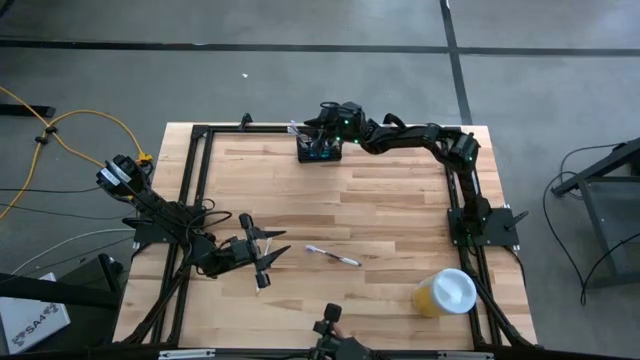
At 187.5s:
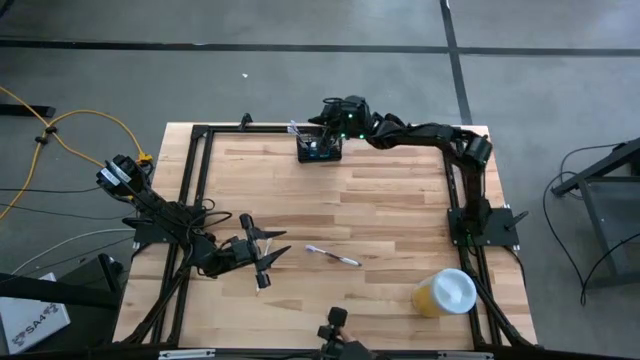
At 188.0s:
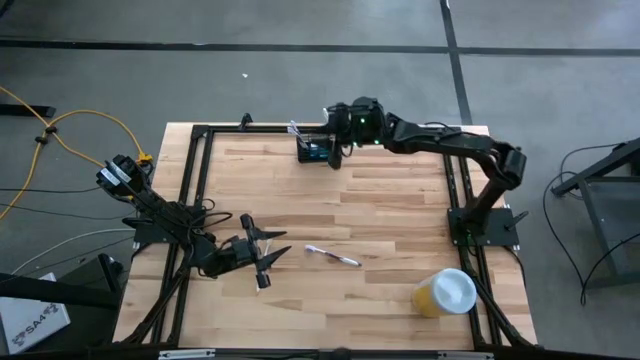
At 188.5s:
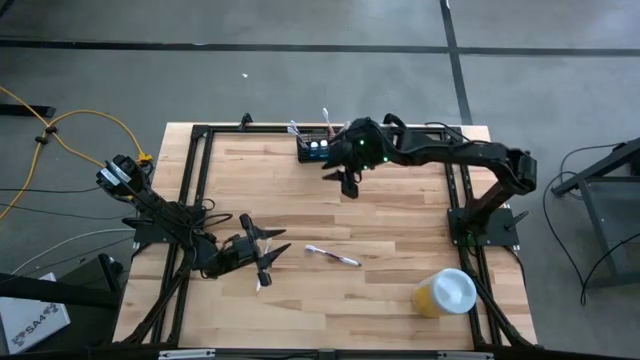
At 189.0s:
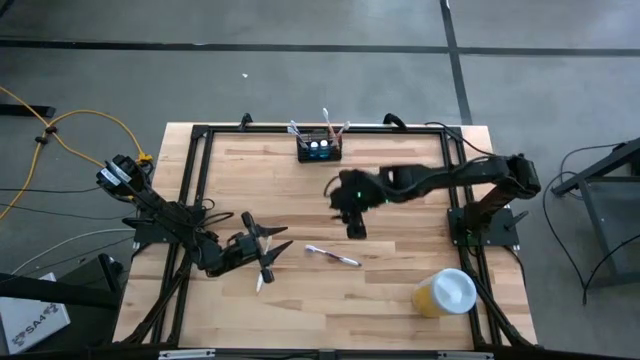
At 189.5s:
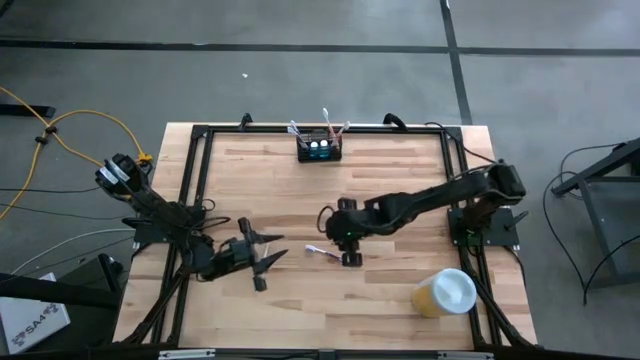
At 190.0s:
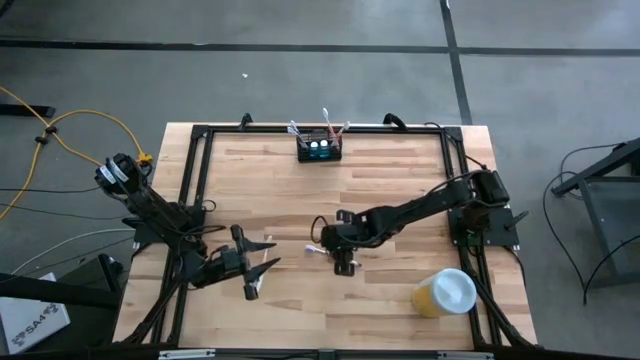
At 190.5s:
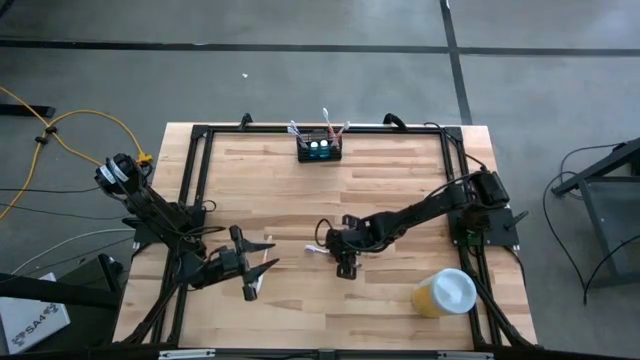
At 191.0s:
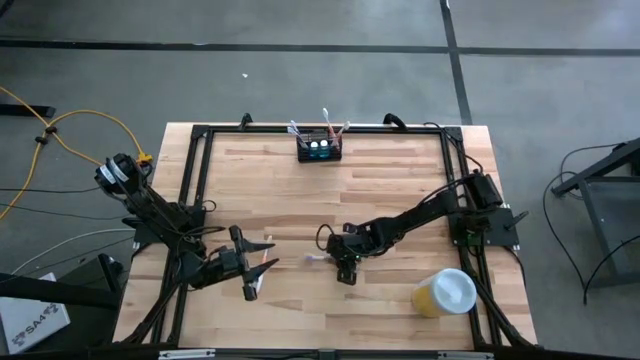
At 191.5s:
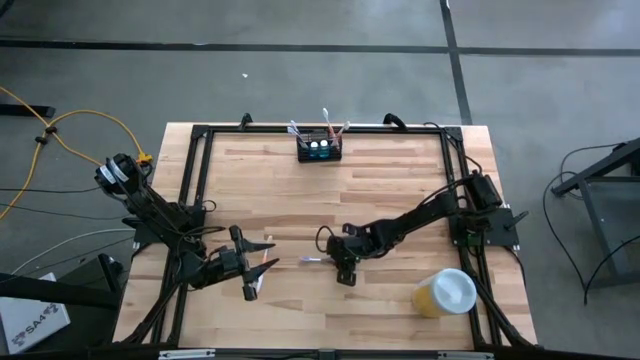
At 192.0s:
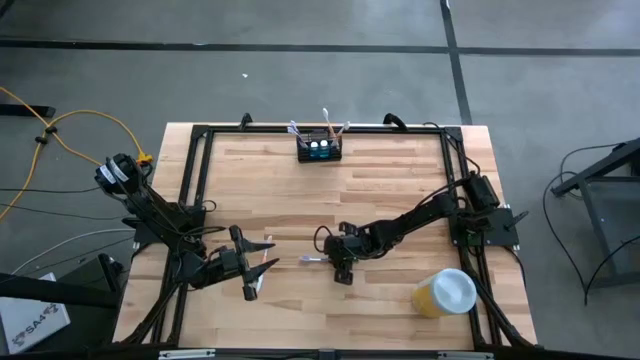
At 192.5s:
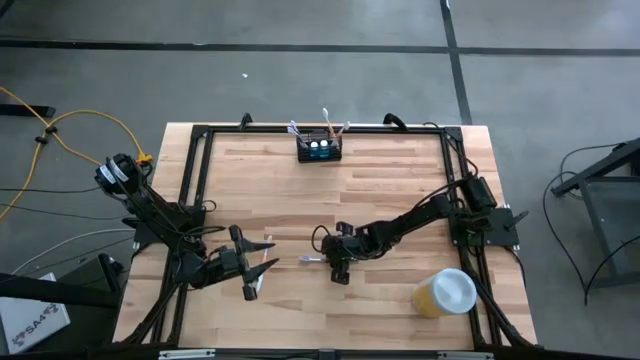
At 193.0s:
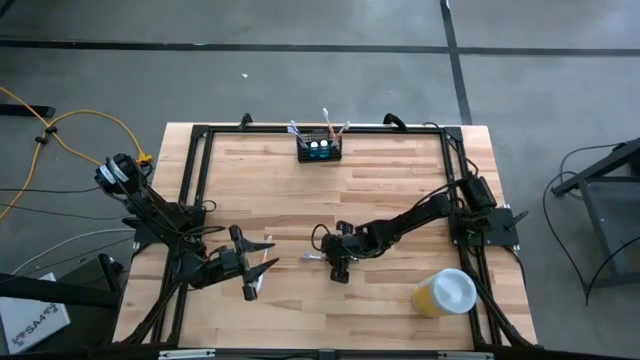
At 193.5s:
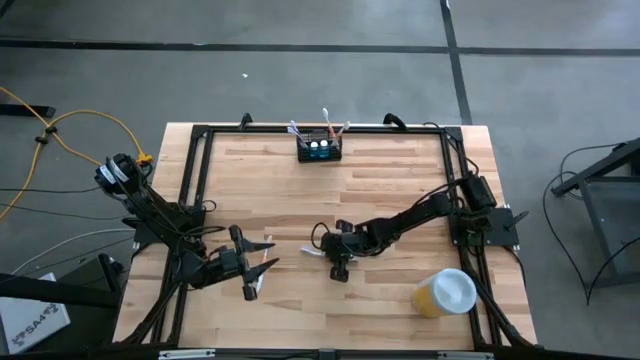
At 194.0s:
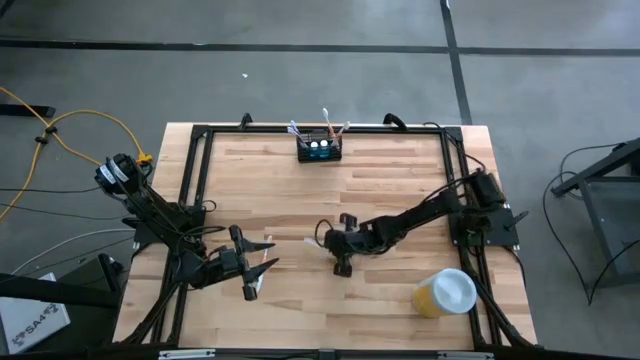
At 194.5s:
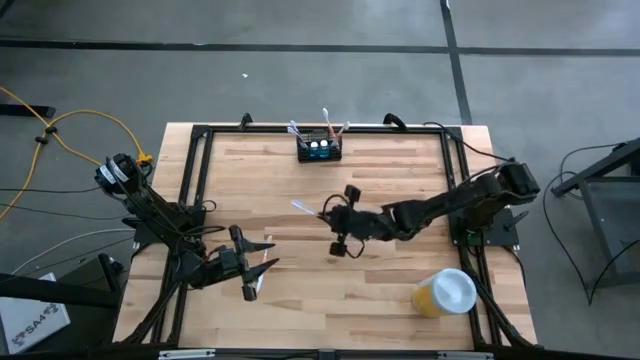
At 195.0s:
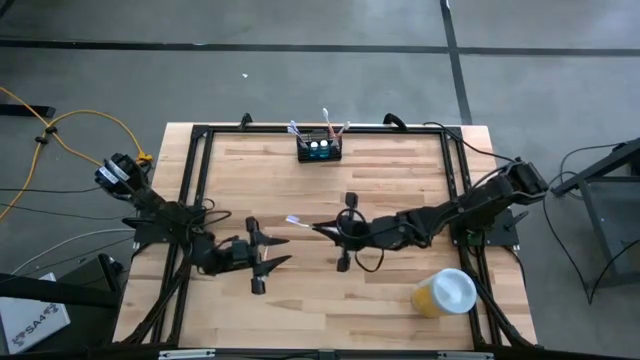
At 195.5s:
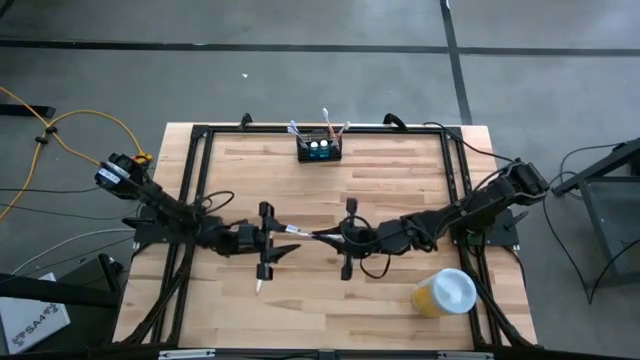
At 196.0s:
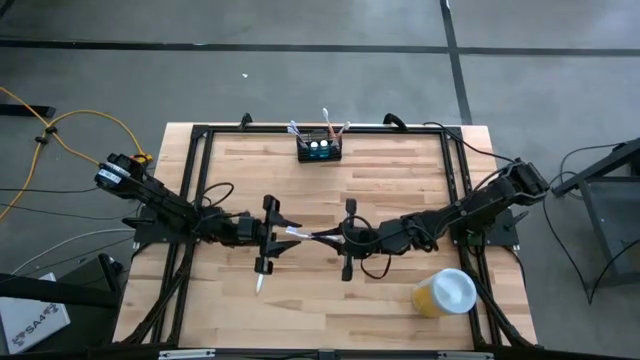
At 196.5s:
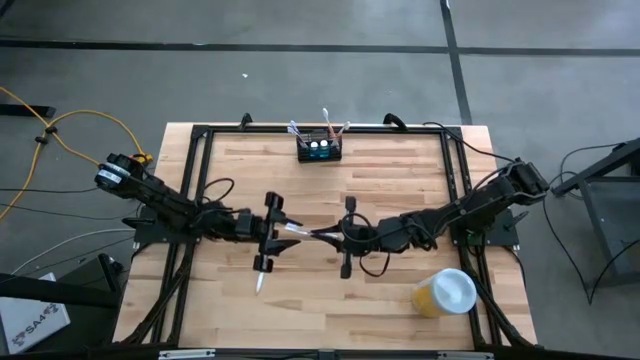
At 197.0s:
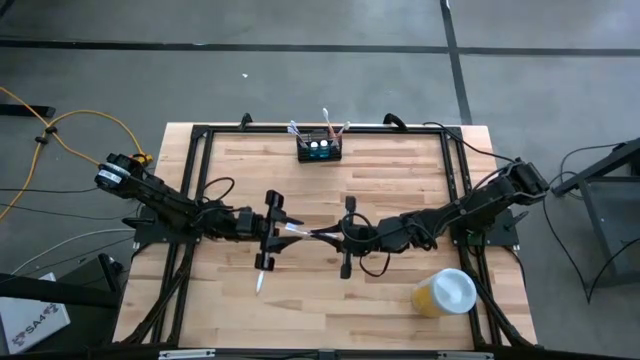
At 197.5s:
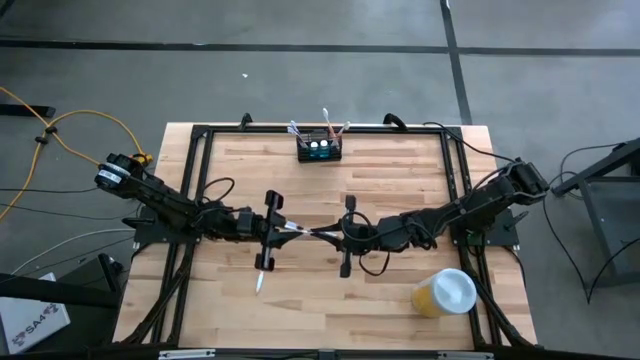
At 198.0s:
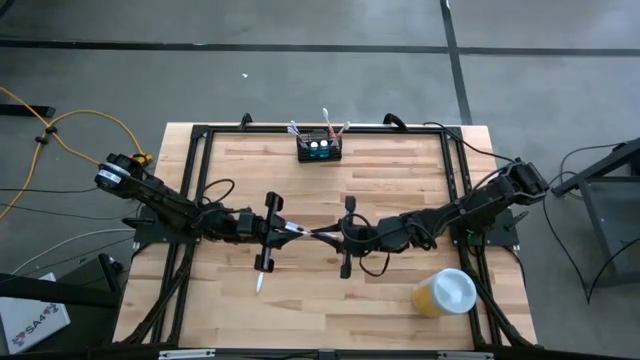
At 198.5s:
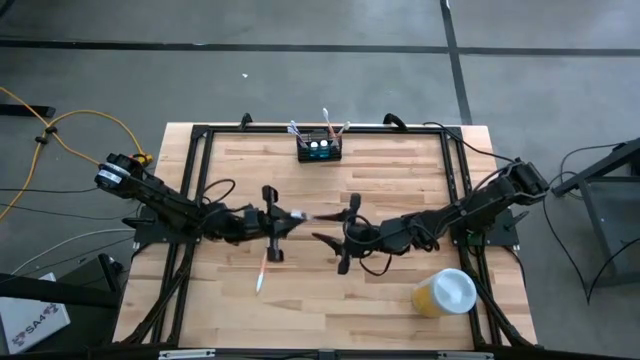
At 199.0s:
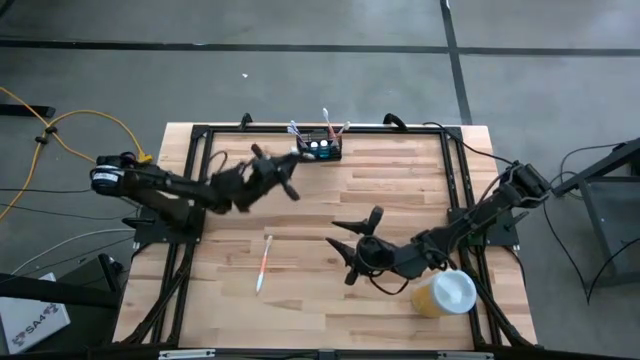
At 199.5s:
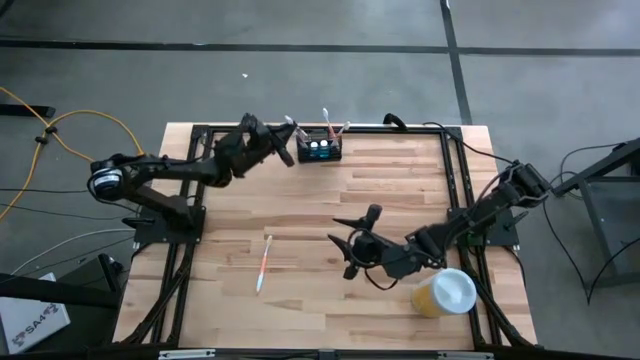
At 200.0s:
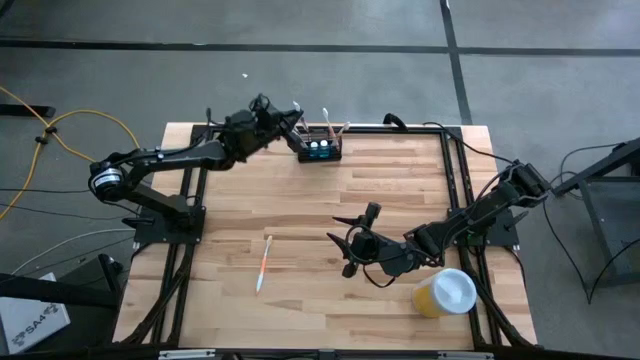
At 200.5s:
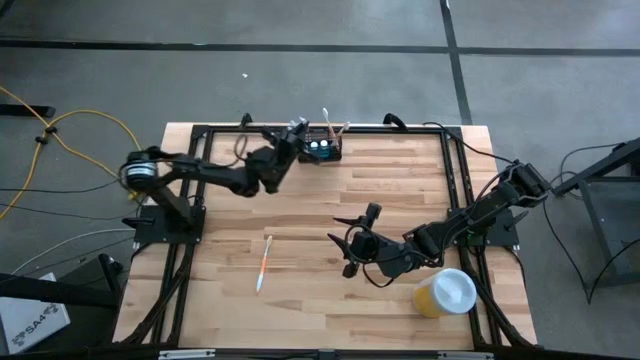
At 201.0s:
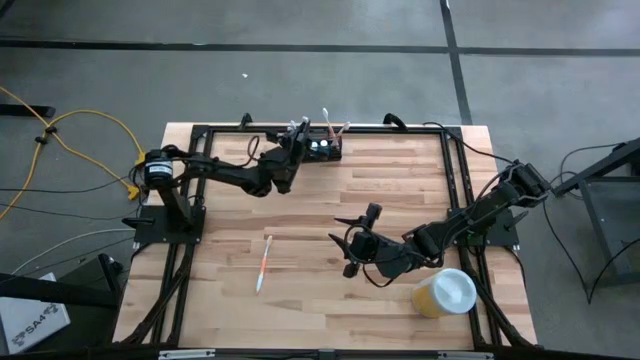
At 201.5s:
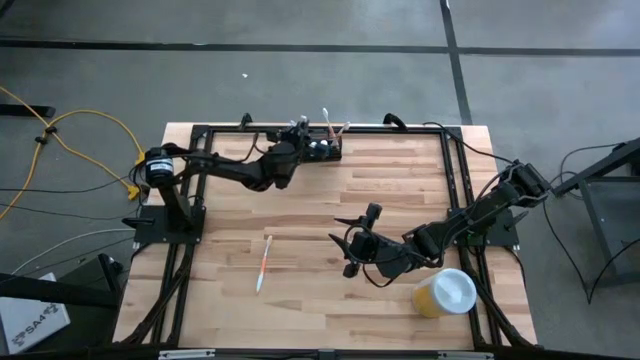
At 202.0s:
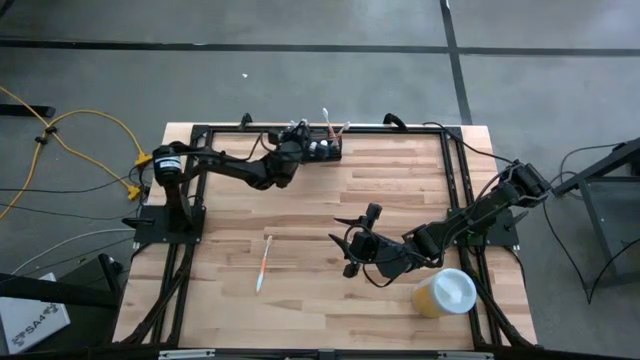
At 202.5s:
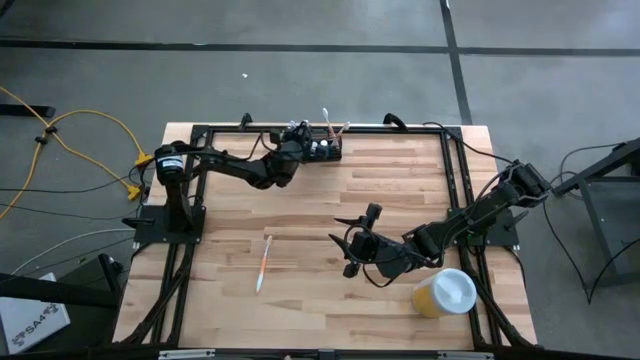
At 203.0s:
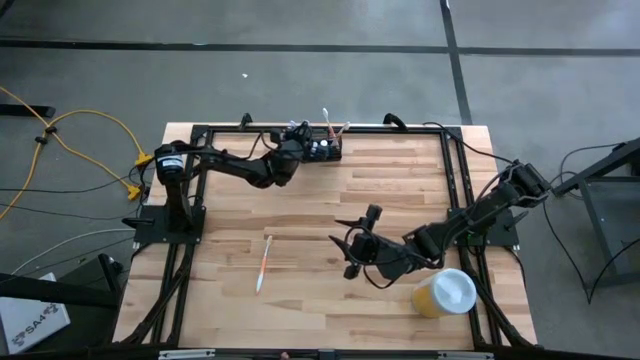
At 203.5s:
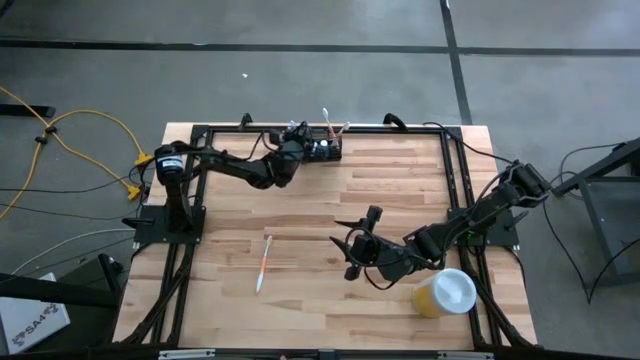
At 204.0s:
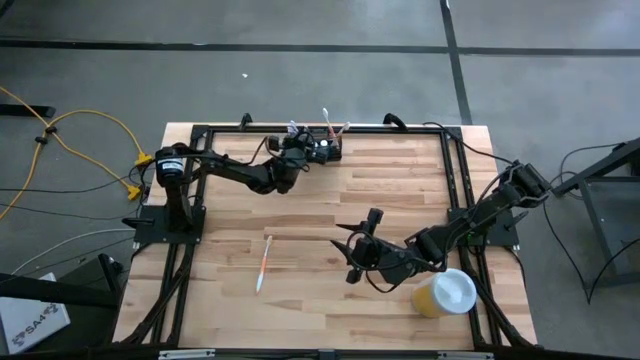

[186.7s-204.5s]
Task: Pick & Place toothbrushing station
Put the purple toothbrush into the wire organizer

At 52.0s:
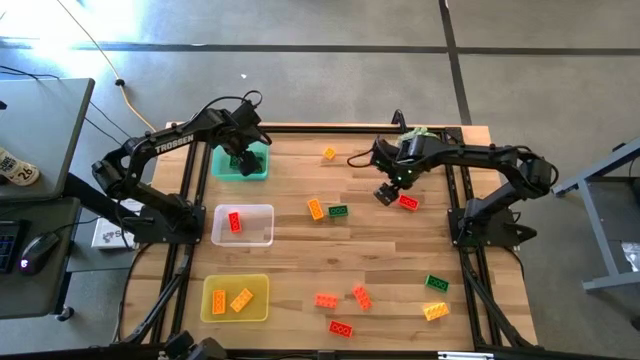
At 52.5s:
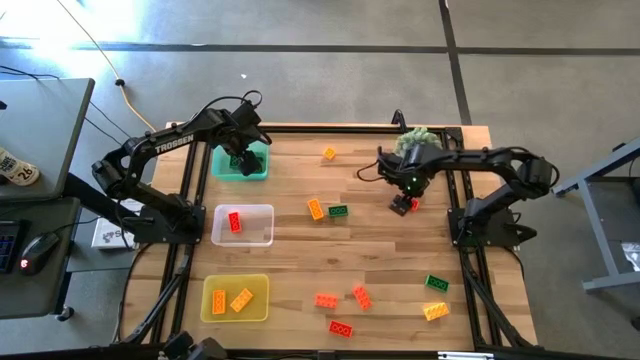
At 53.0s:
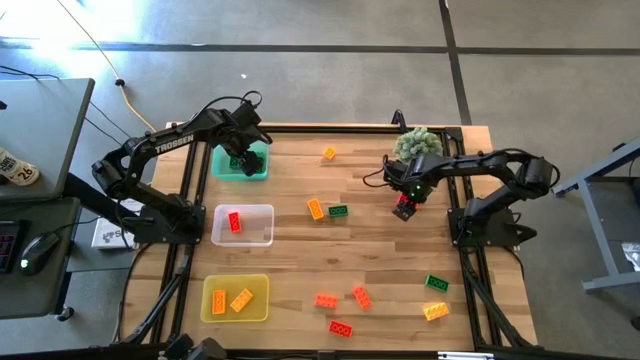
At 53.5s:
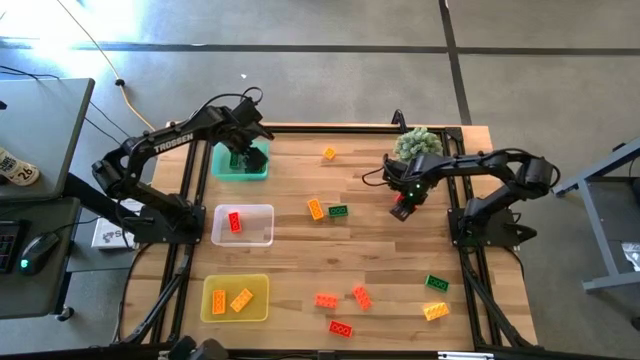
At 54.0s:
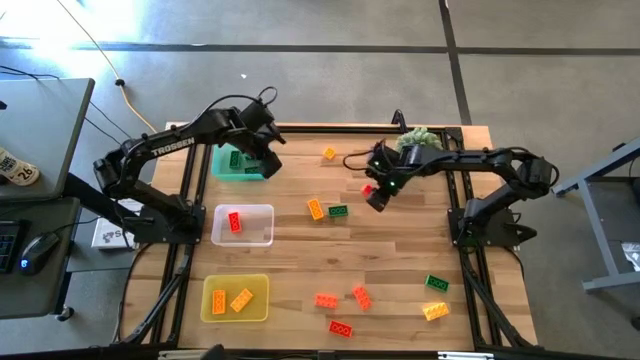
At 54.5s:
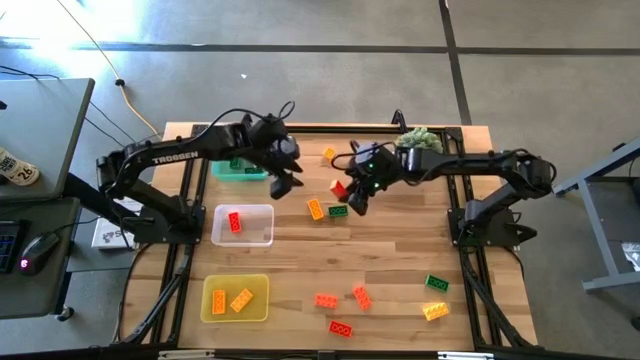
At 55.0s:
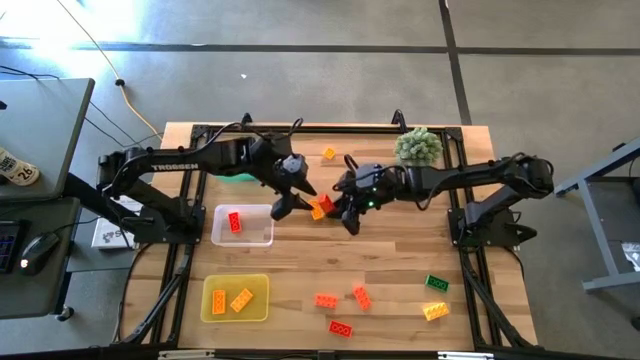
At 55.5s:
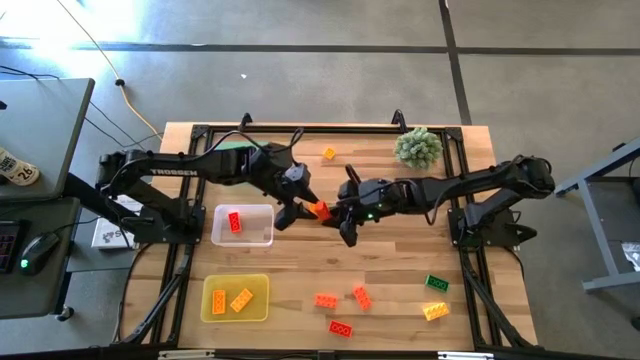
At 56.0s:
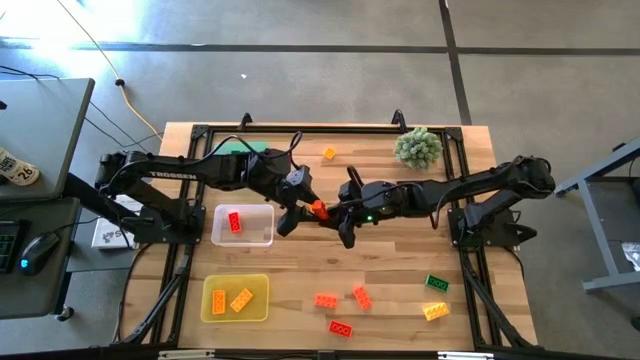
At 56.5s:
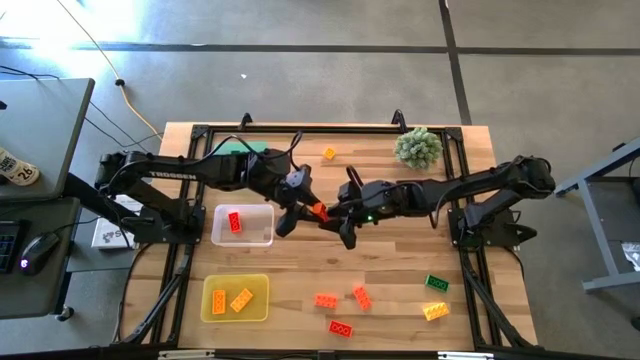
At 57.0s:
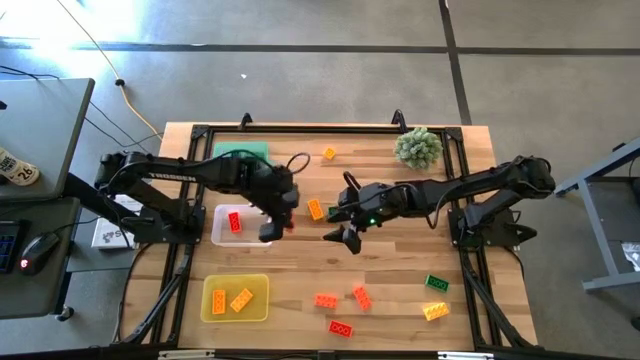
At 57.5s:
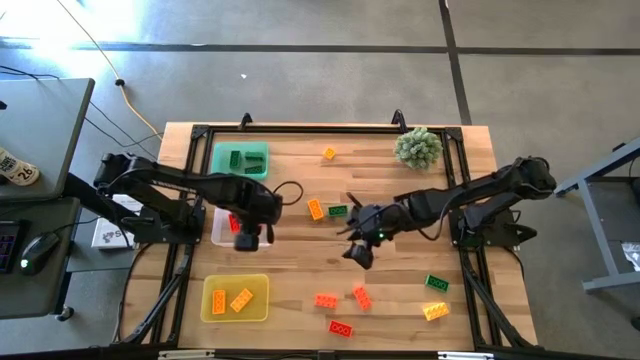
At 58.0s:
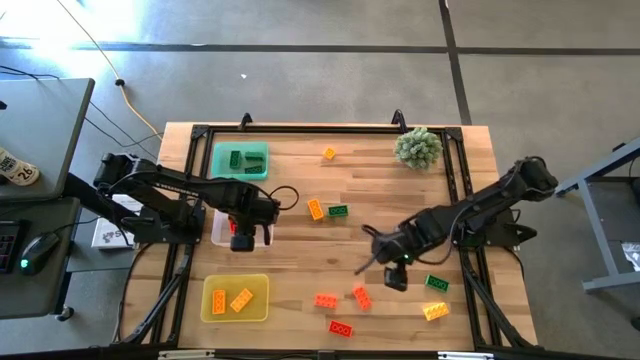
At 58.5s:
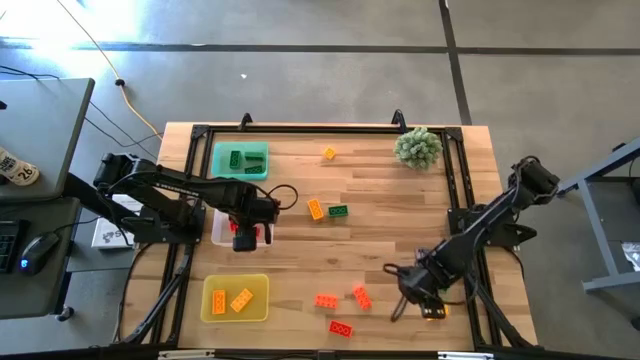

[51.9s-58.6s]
Task: Sort & place blocks by color
Put the orange game piece into the white bin
